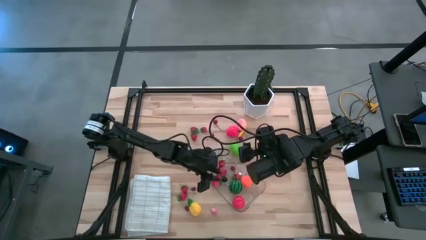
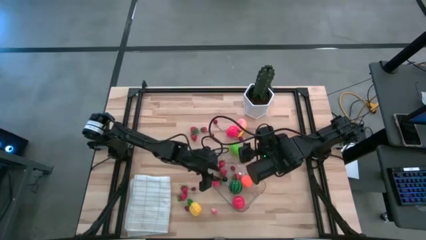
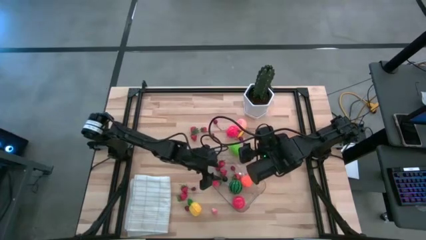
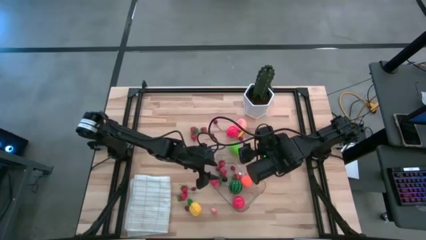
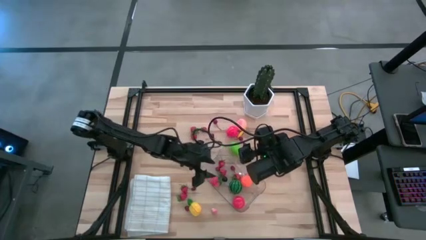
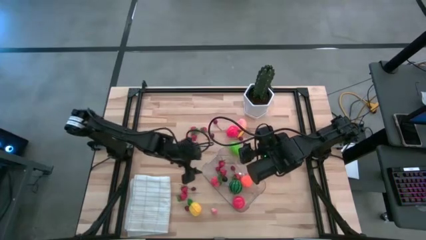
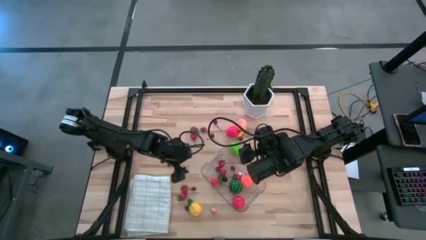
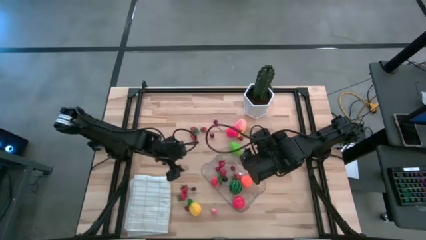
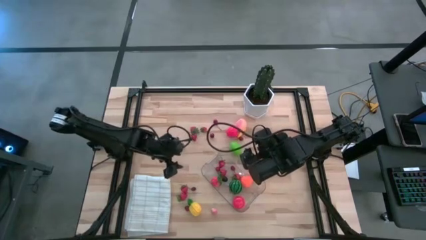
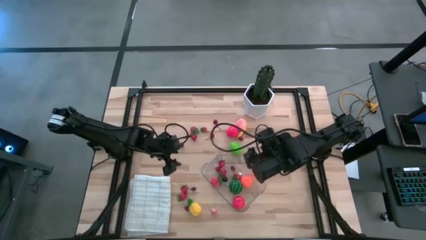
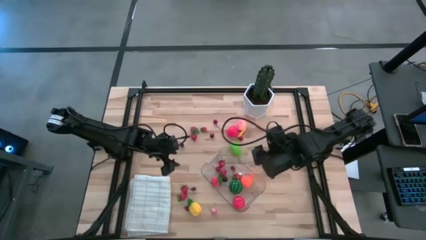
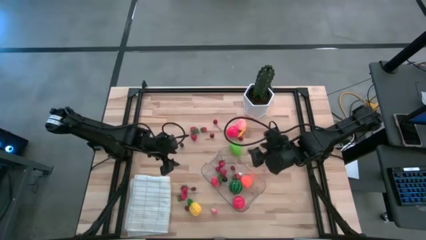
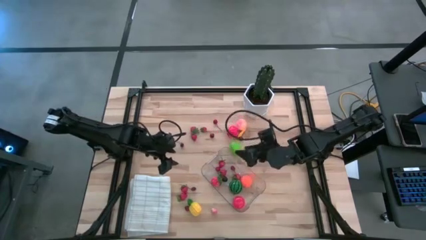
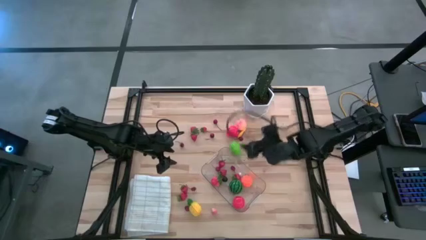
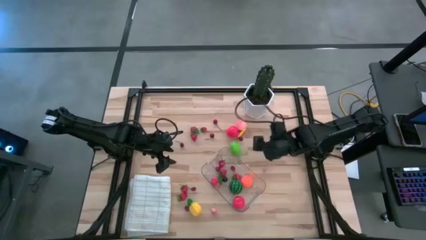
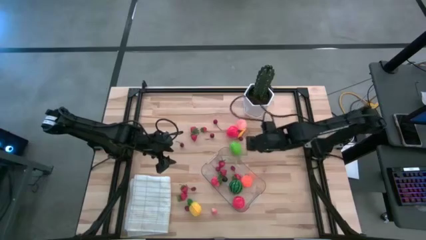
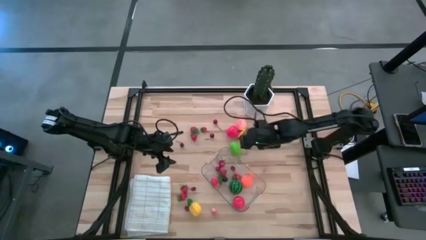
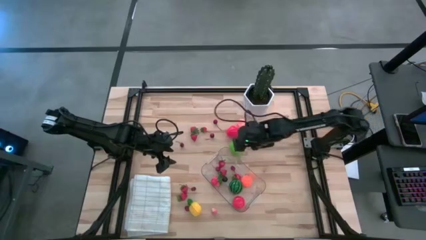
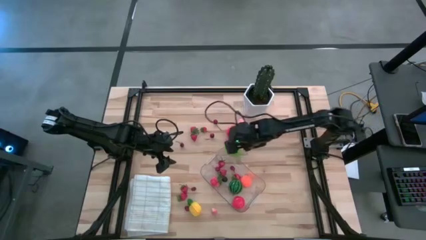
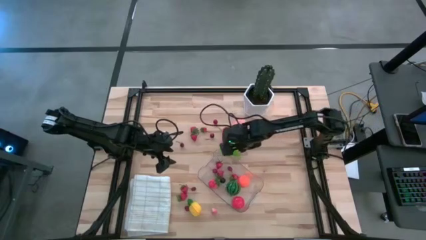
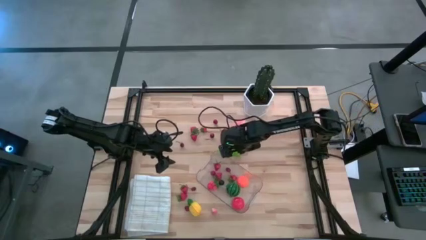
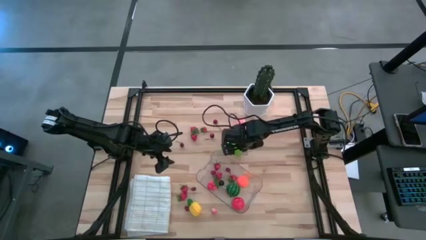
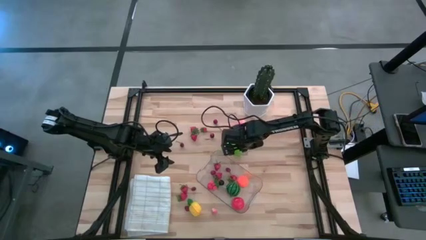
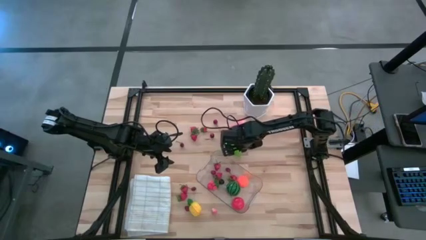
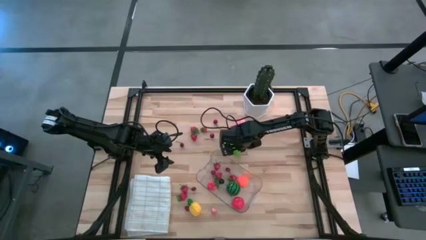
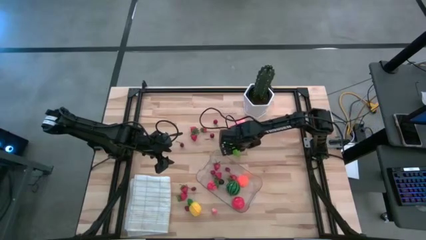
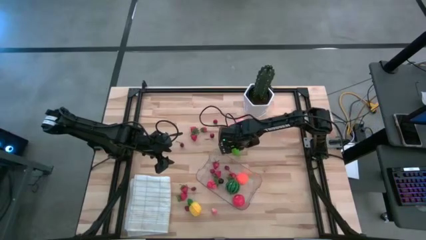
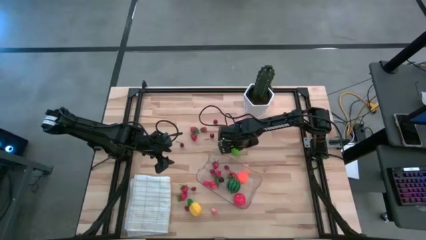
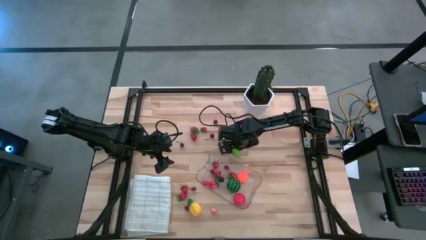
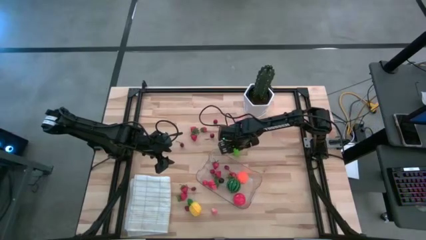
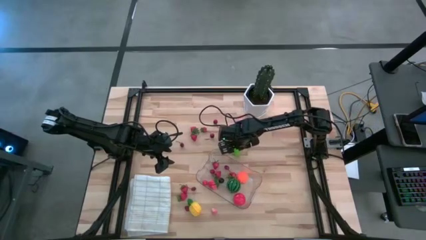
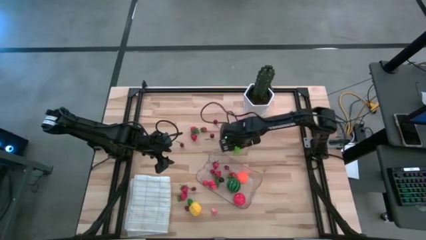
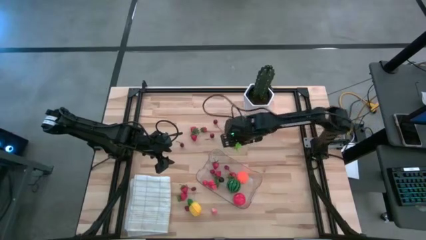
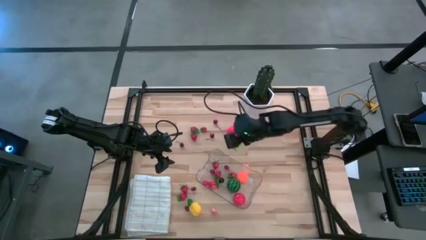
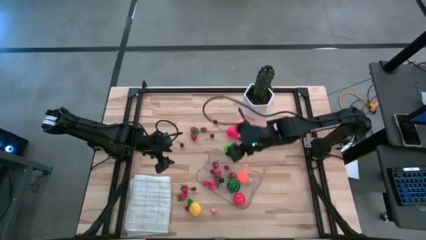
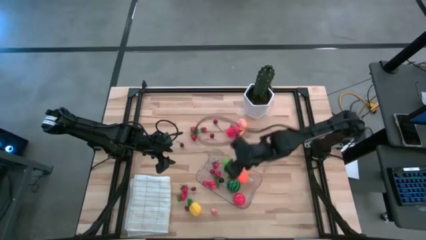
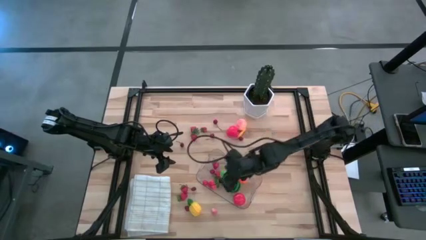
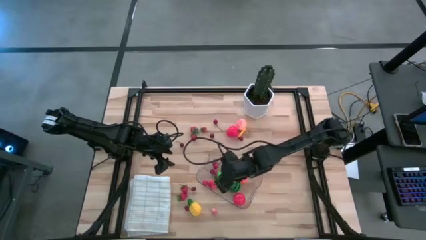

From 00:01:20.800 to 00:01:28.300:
Task: Pick and placing Produce into tupperware
Put the green melon into the transparent bin

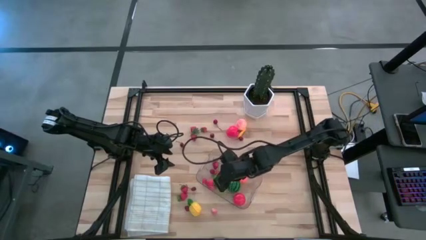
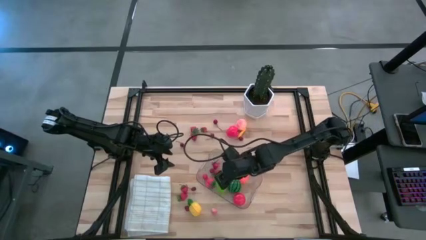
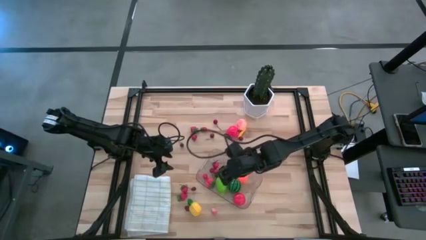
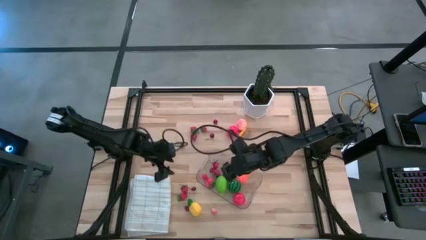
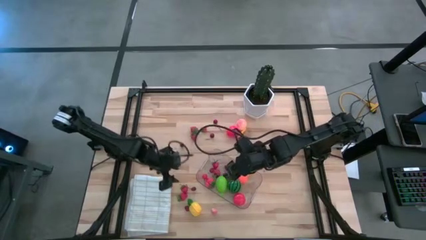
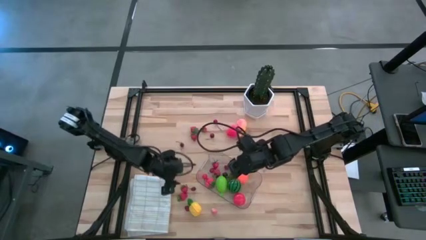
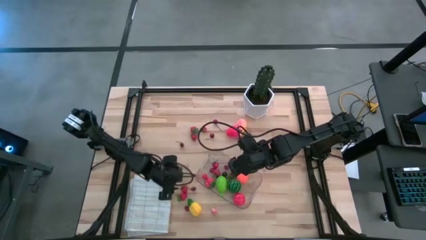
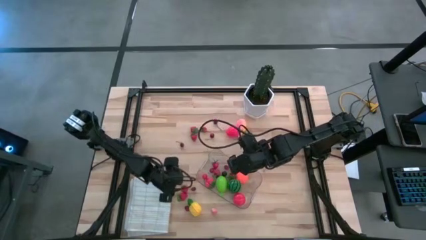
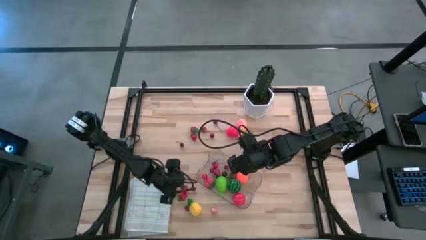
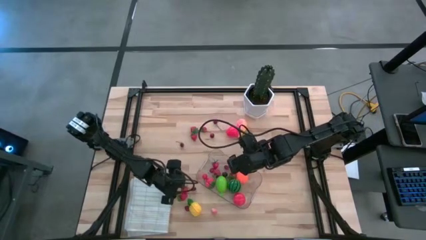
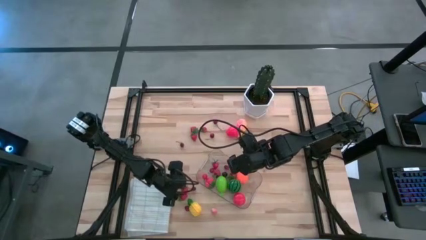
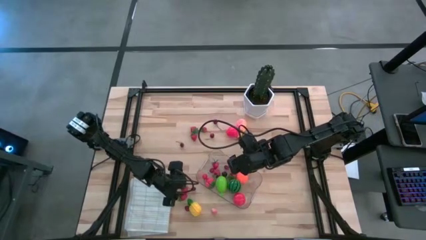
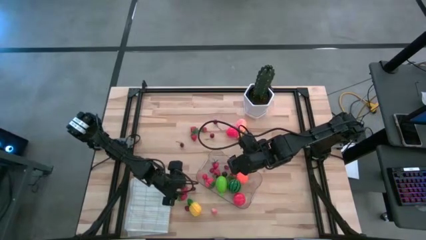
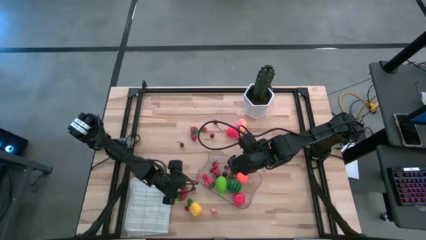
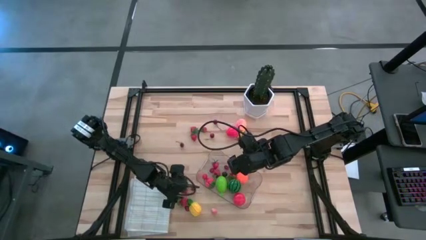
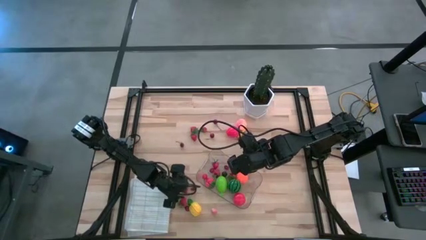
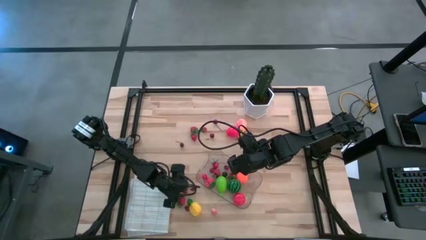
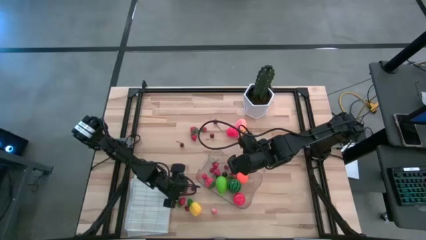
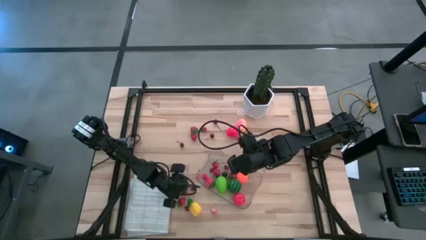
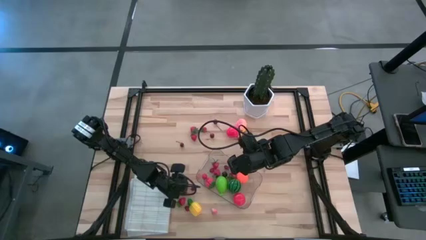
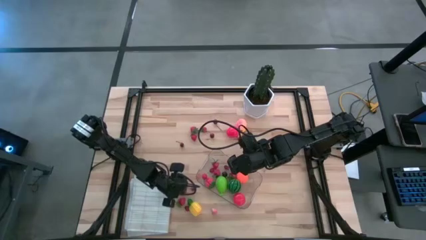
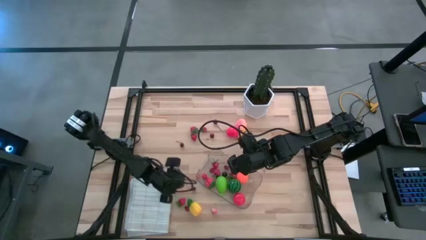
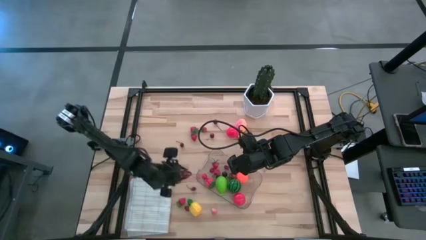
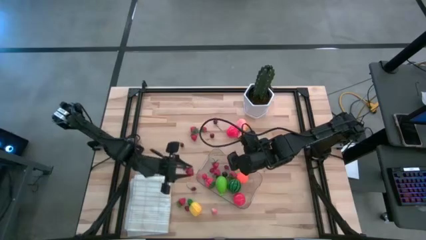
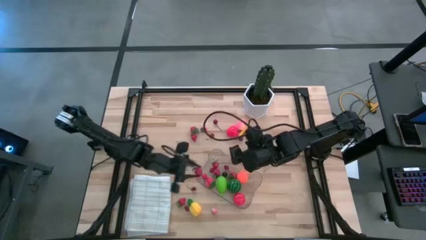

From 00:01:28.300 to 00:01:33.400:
Put the red strawberry into the transparent bin

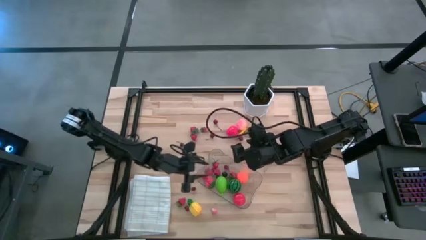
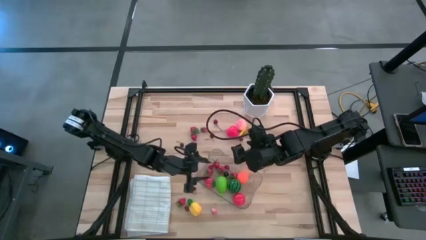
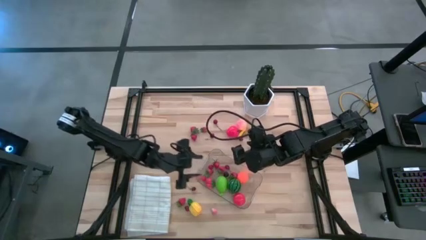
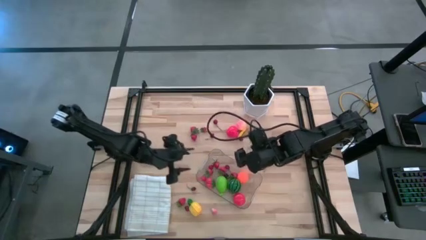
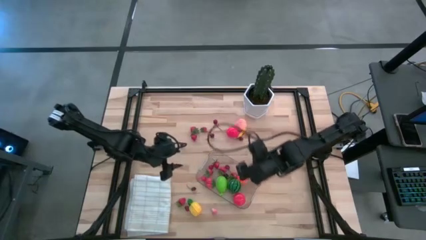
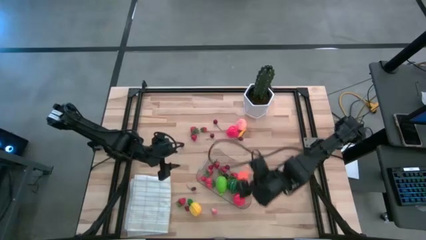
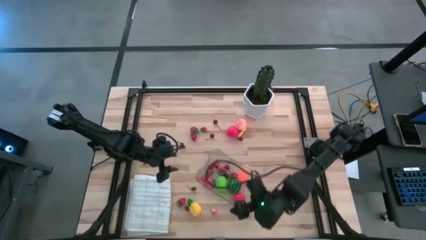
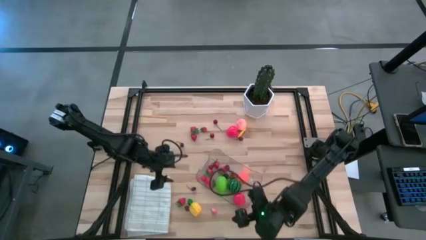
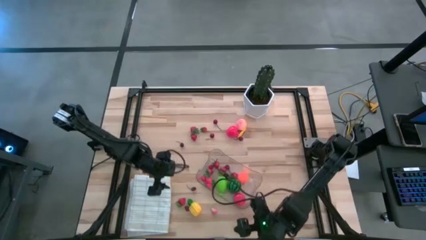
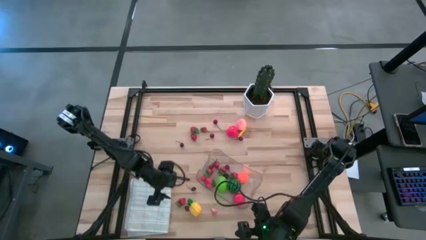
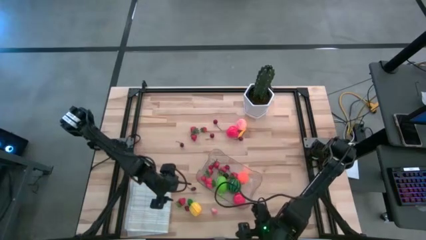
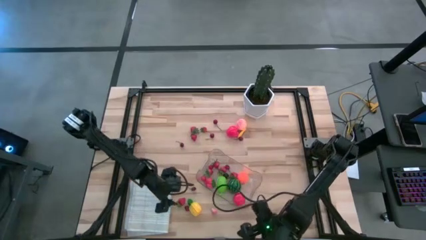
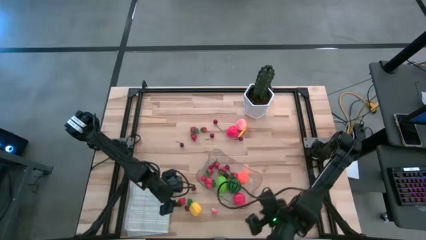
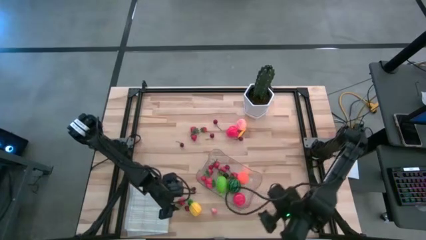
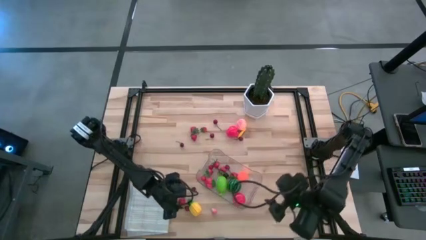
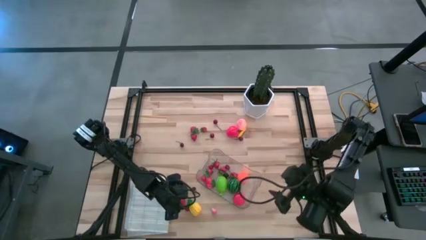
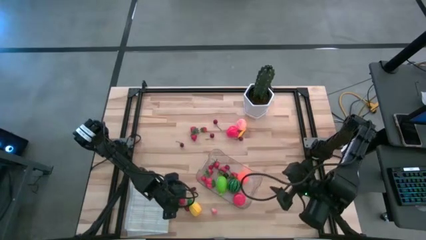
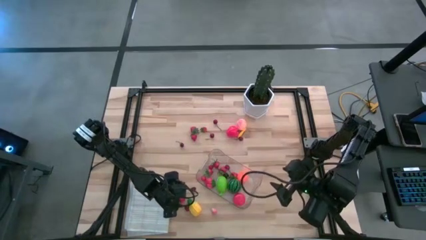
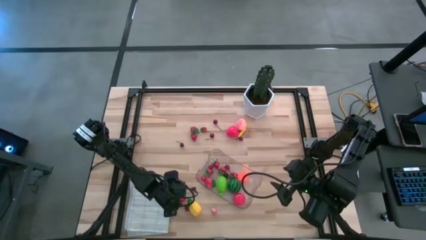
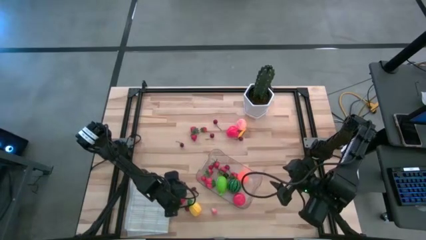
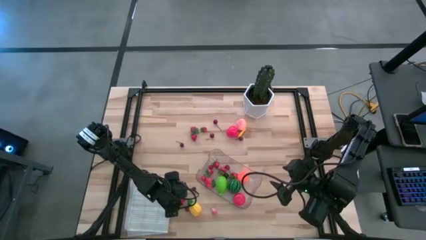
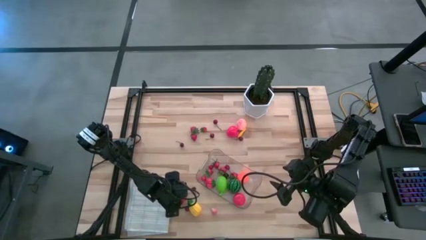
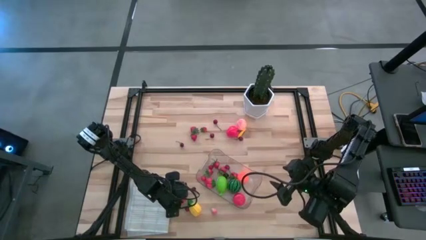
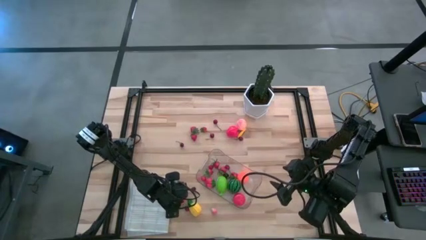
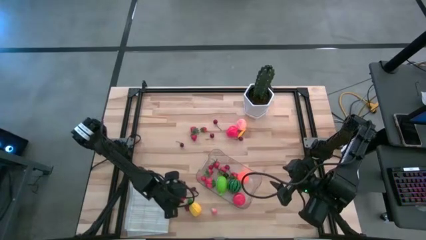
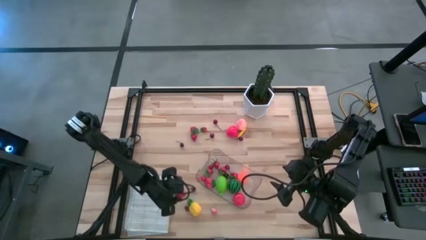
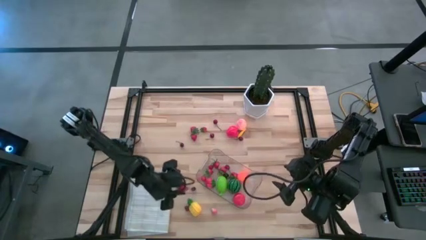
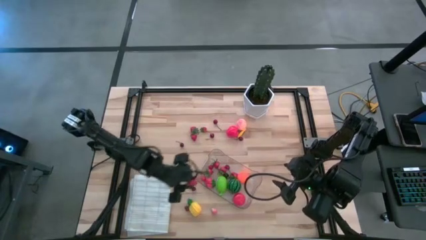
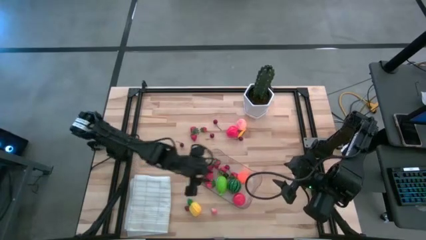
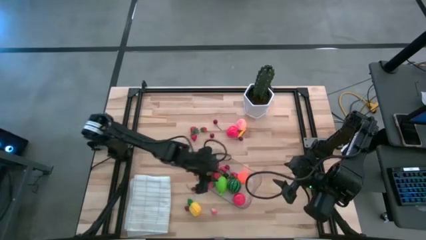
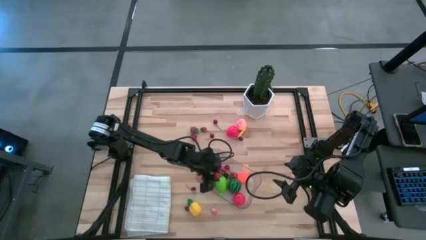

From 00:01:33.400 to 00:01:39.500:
Put the red strawberry into the transparent bin
